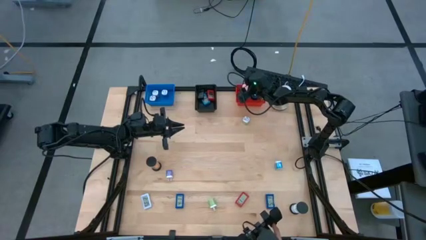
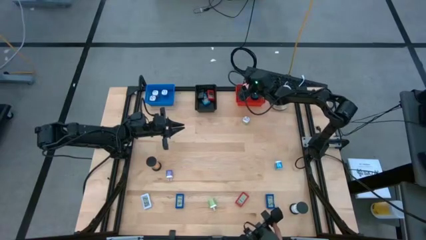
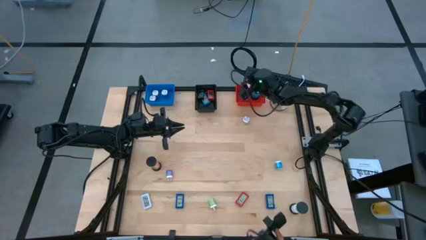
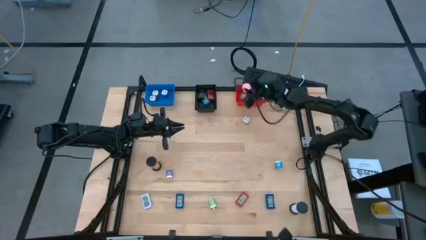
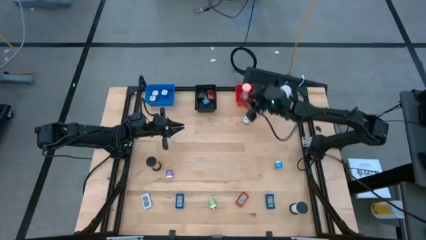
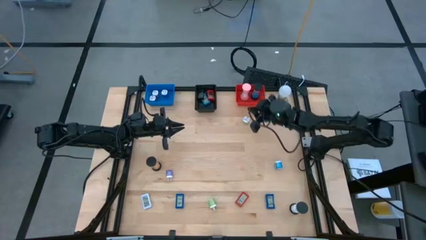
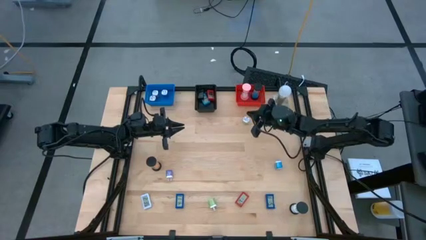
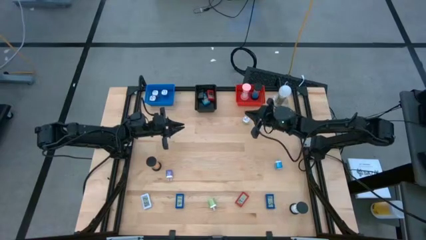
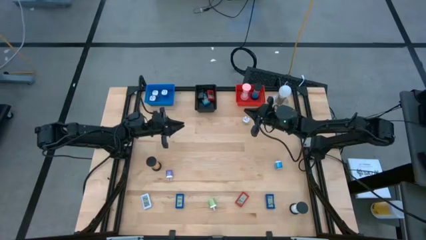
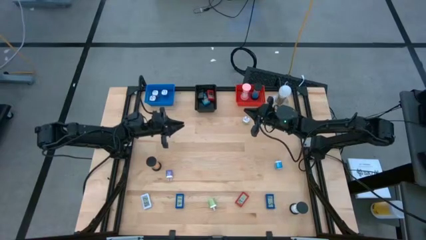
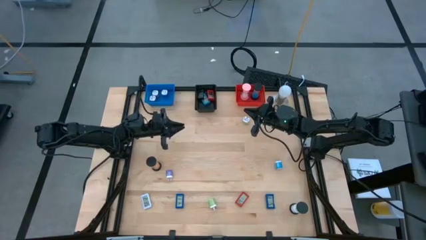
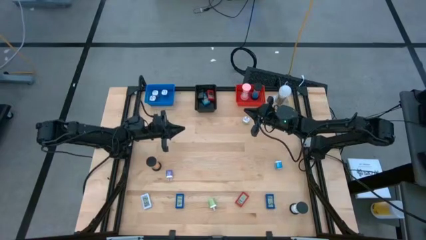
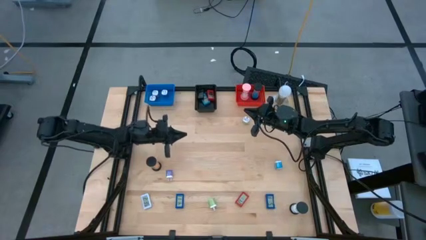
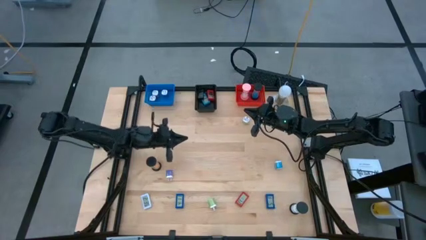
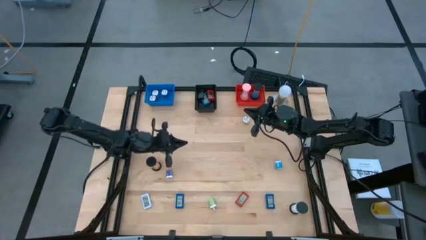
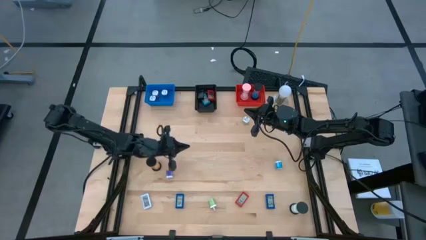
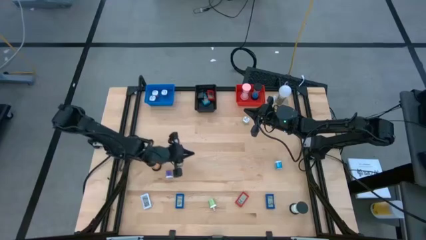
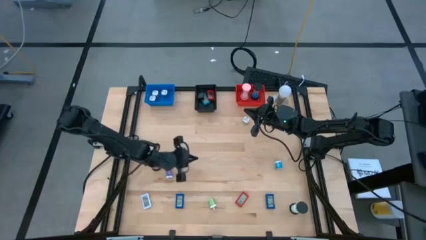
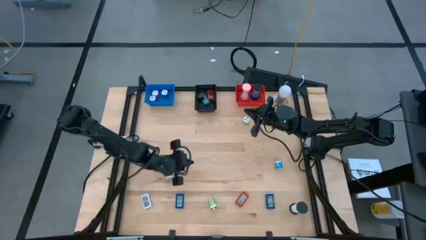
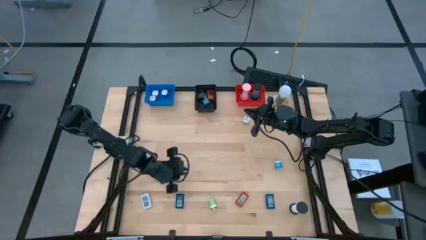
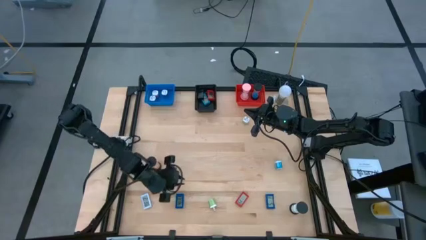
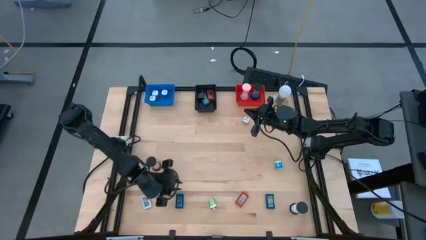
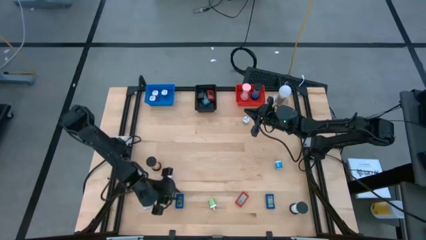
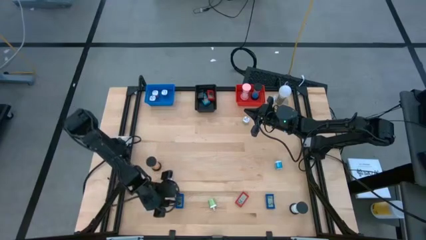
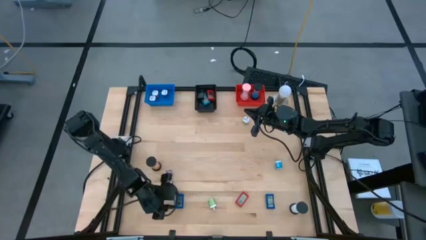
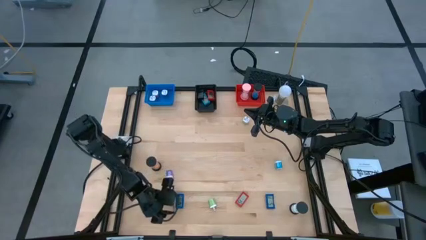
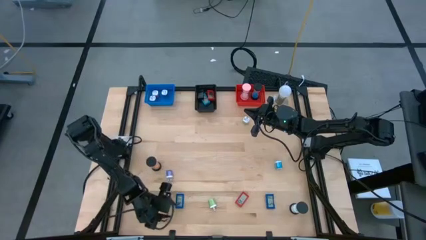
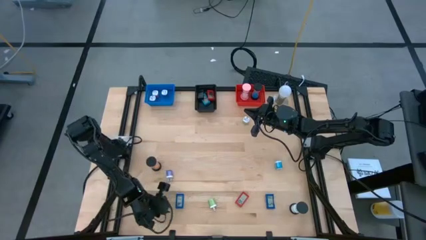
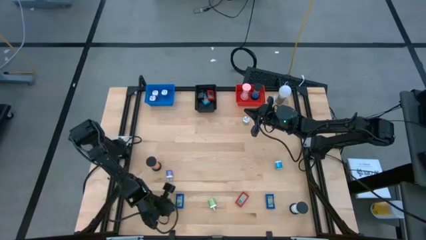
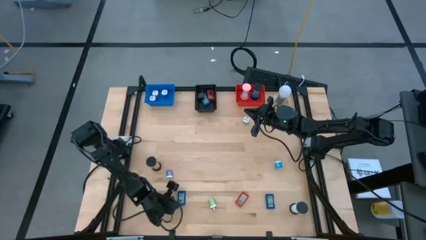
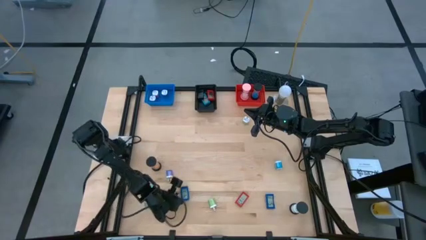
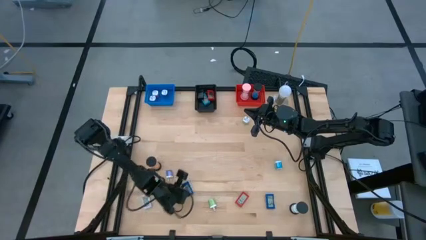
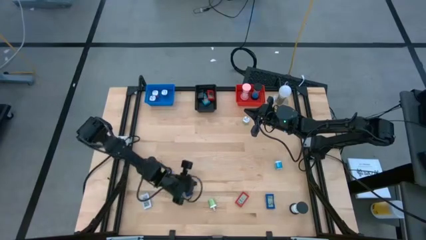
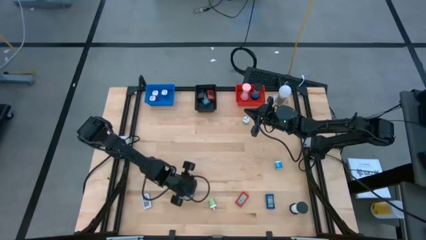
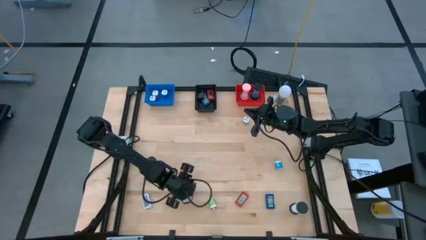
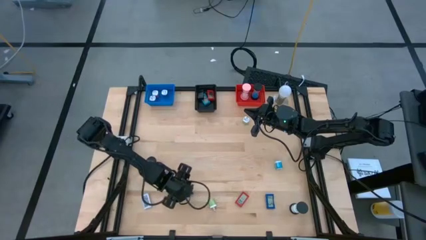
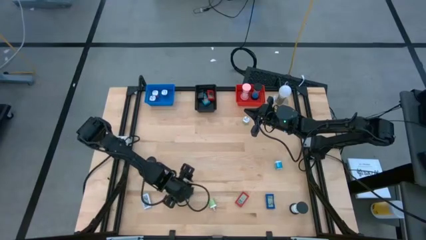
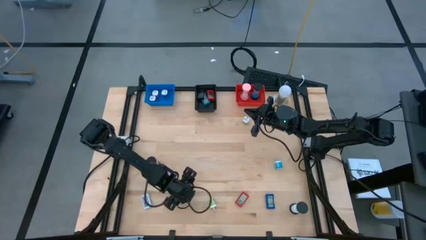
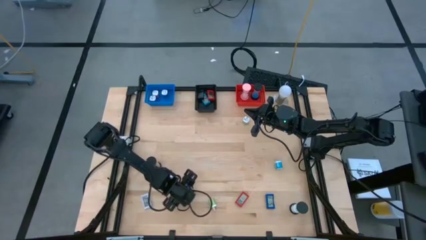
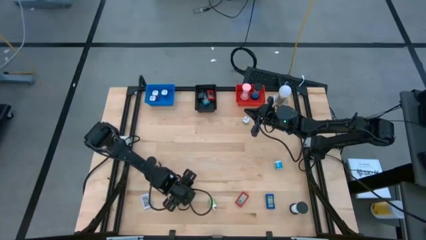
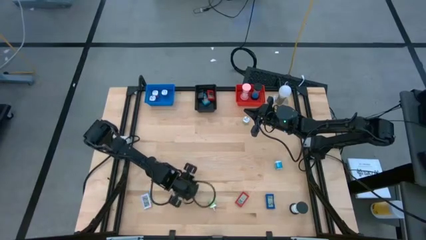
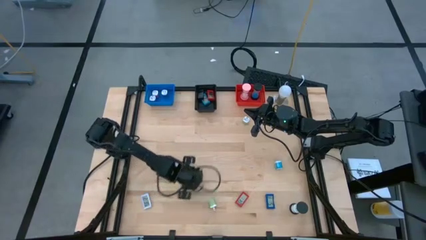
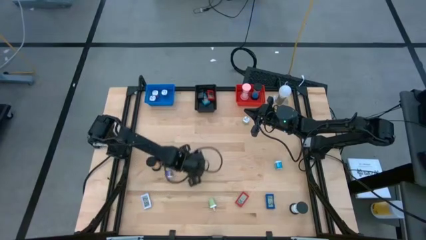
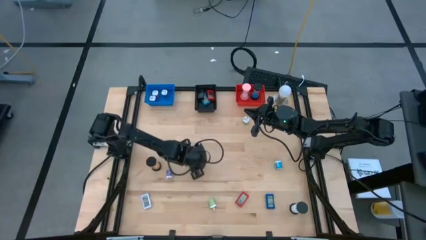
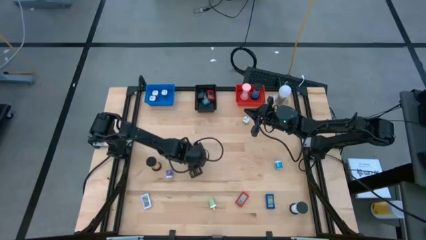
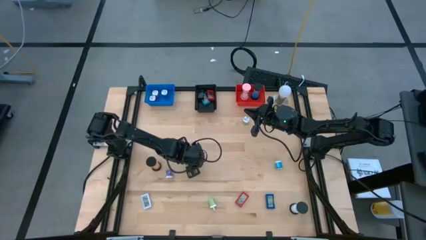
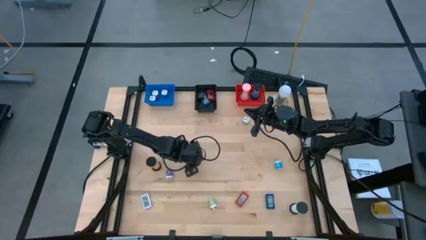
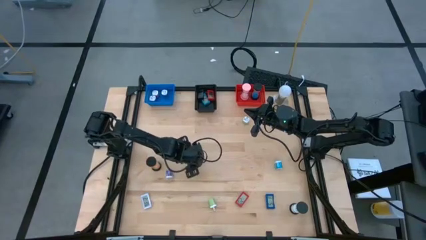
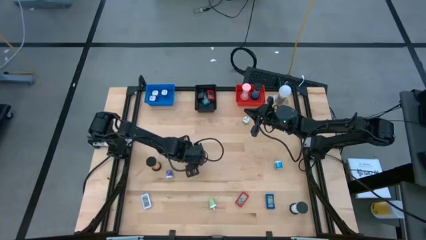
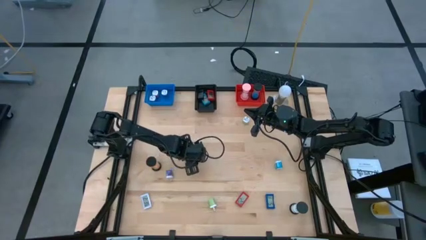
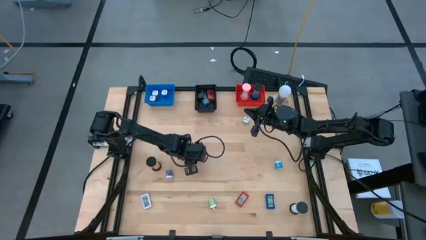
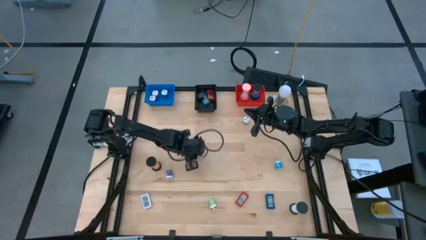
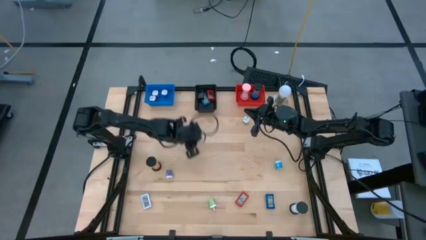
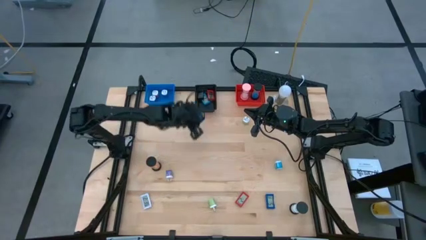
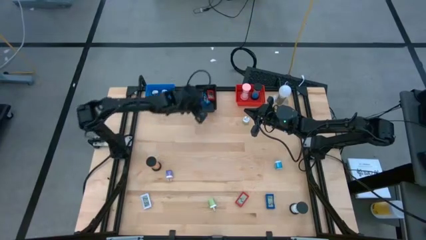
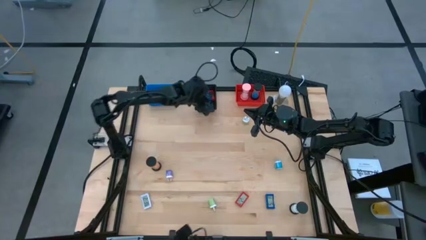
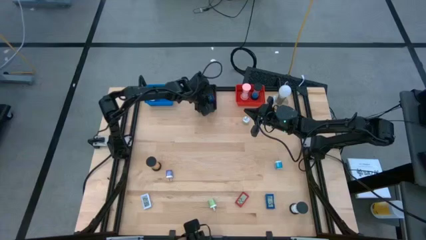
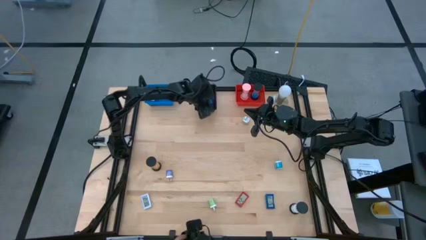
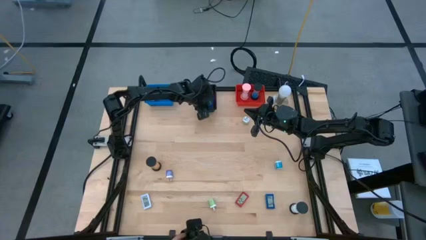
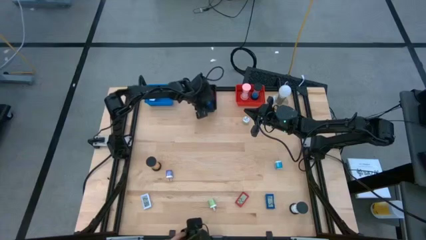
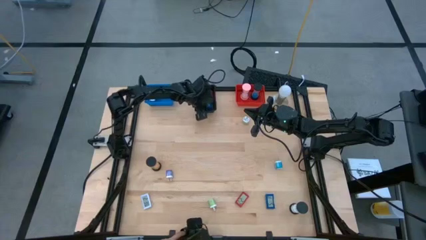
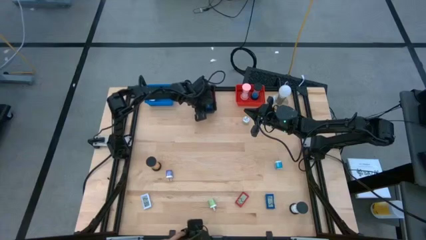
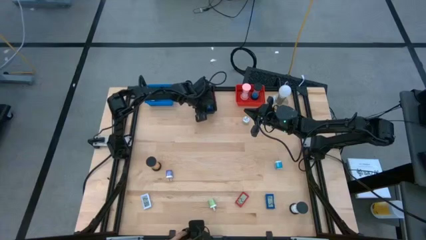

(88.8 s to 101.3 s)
Task: Pick & Place Office items
Put the left blue digital clock into the black bin

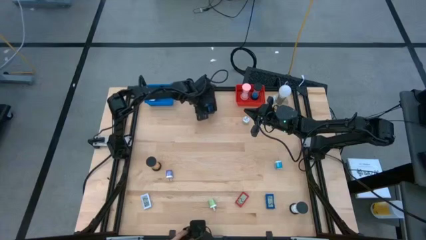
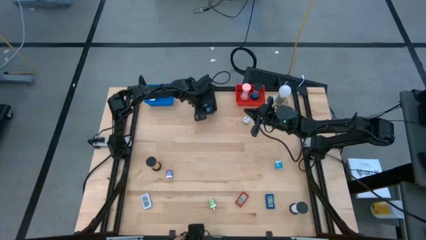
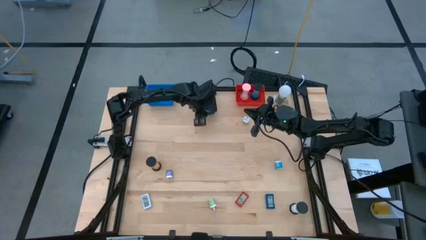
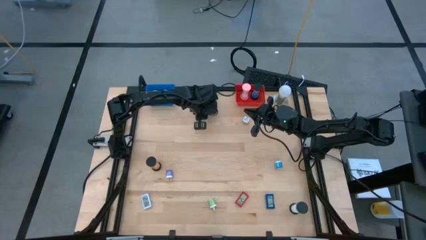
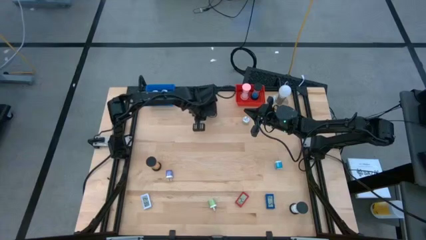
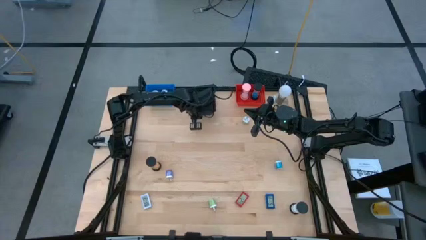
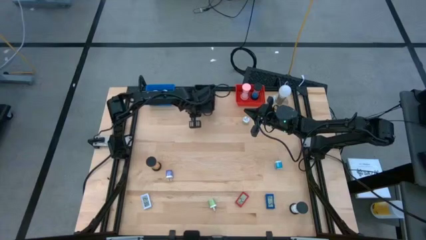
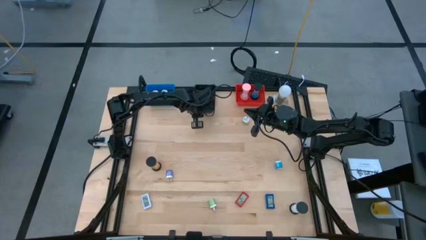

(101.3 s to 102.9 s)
Adjust the black bin
